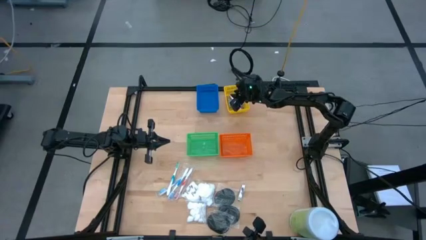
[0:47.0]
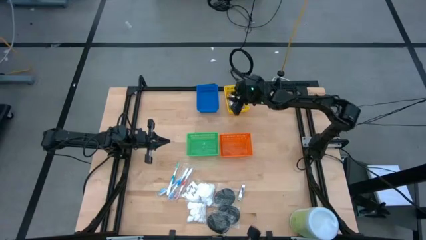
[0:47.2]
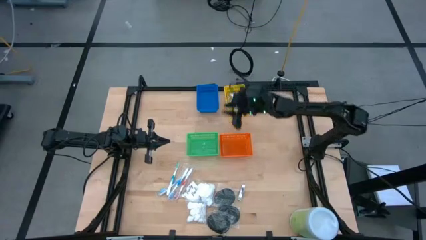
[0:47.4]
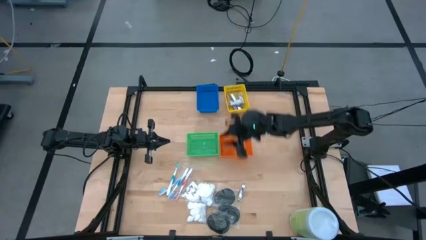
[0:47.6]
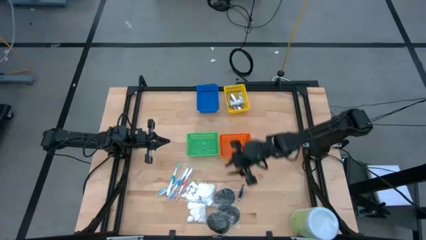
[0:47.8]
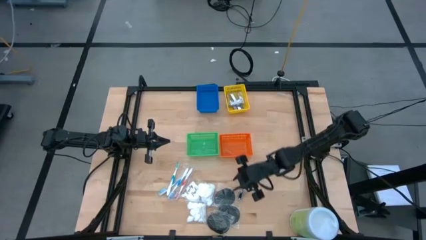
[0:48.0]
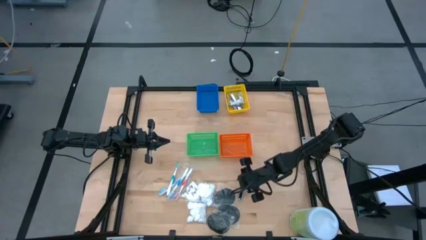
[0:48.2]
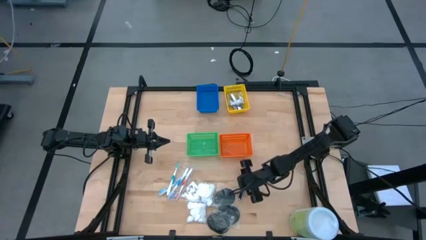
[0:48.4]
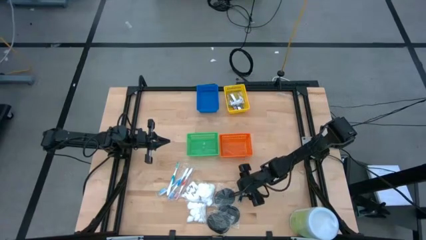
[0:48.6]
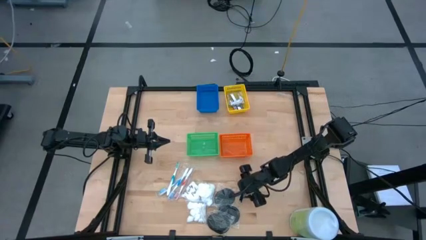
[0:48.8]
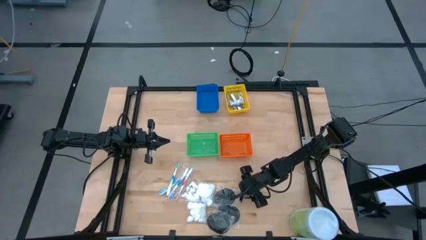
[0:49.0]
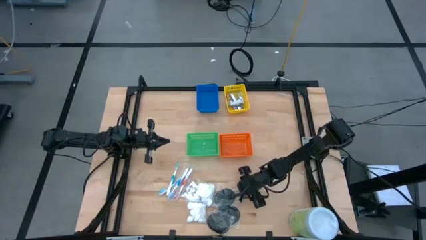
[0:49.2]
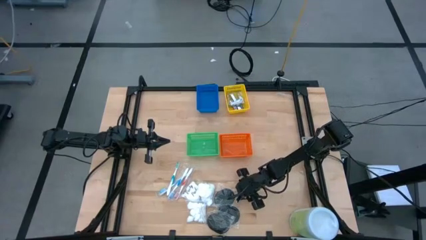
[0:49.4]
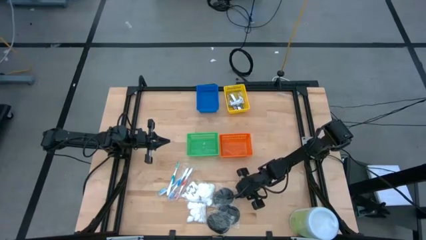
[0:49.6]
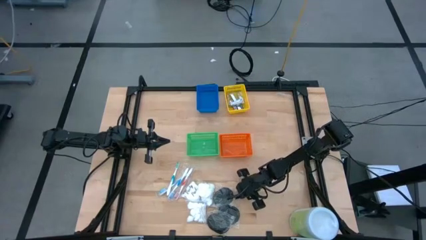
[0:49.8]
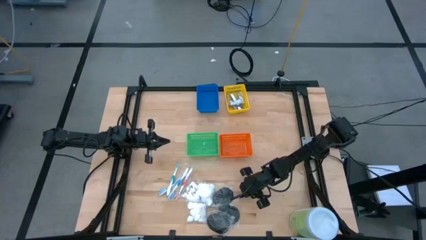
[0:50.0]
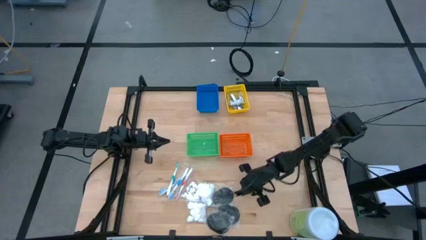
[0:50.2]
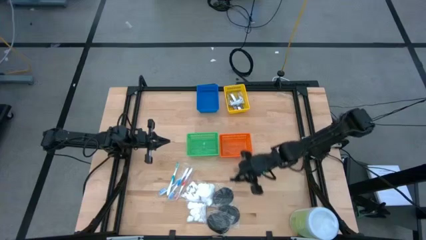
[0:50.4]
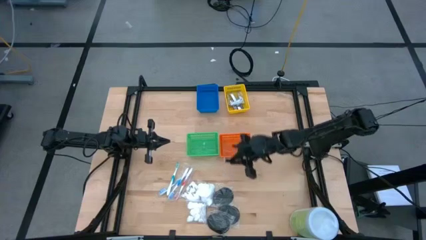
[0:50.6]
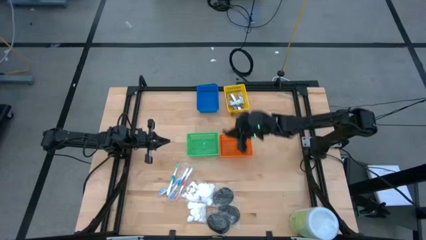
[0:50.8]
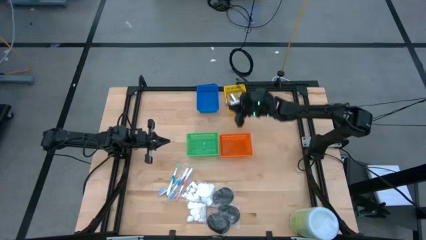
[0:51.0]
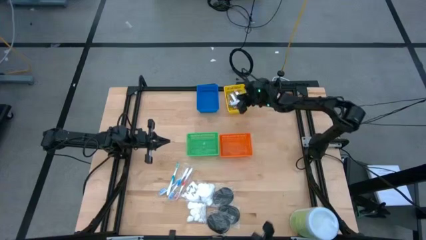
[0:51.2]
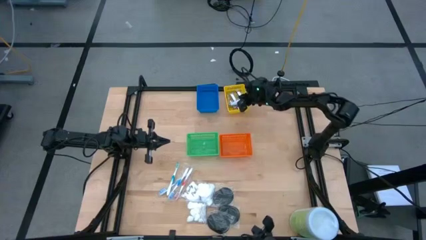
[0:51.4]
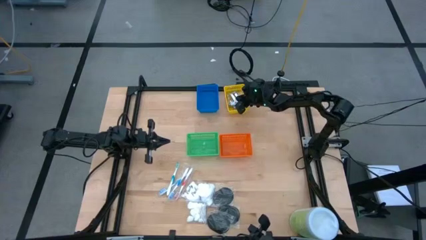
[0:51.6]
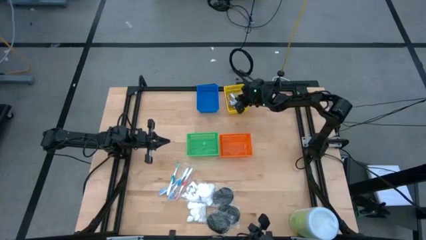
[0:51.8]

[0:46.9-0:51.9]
Task: Pick & Place Travel size toiletries
Put the nail cutter into the yellow bin

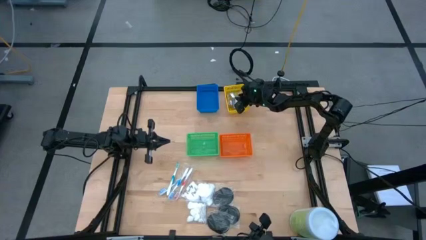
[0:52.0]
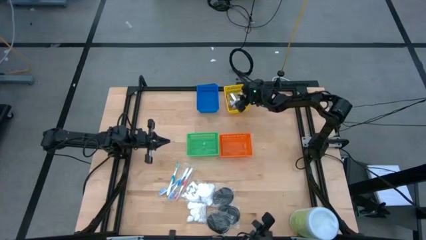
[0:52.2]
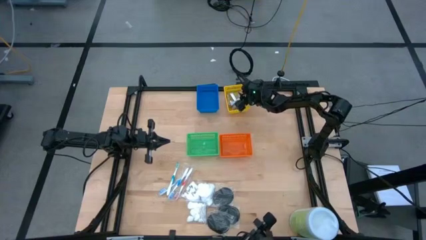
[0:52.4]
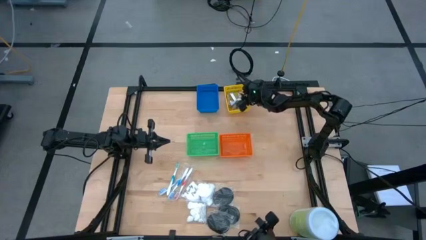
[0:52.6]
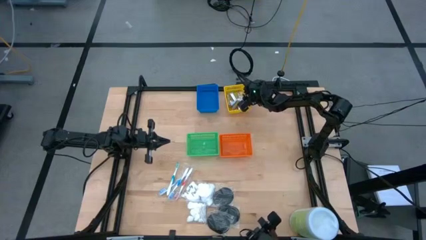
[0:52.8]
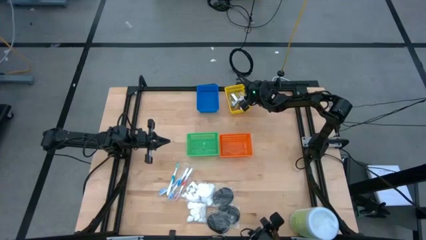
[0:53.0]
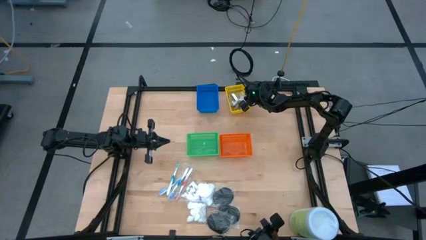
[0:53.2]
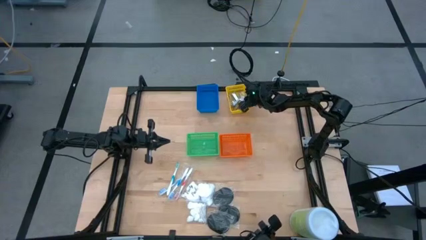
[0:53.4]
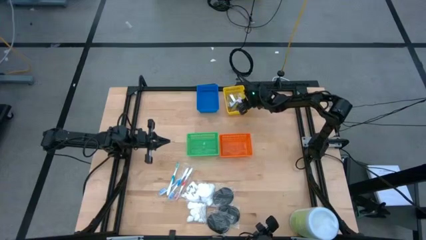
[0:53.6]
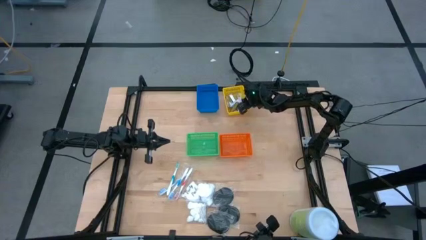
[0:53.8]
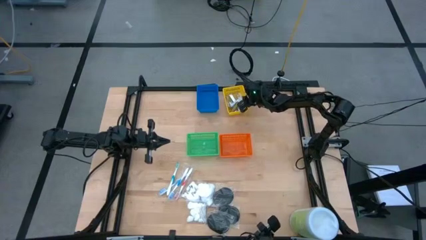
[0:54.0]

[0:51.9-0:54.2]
Adjust the yellow bin on the table

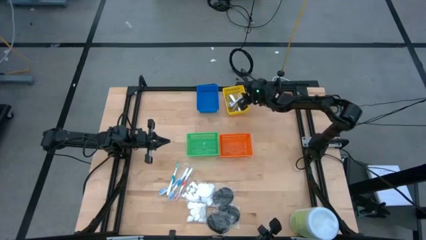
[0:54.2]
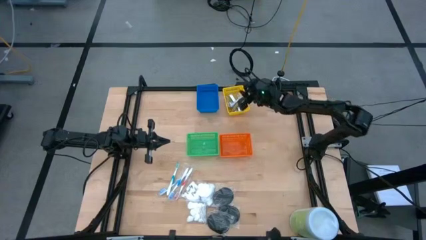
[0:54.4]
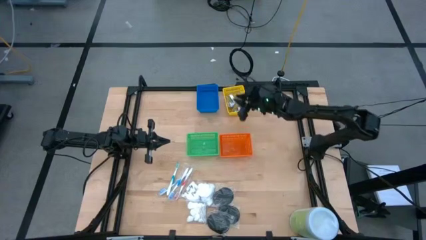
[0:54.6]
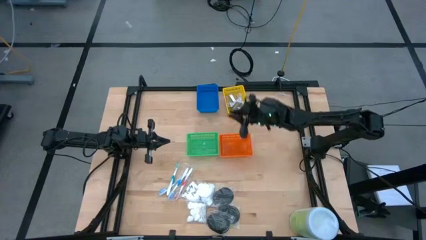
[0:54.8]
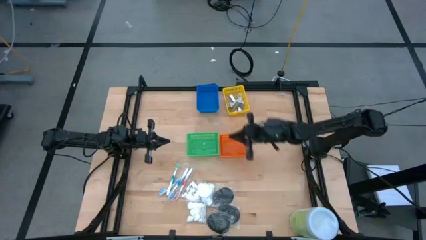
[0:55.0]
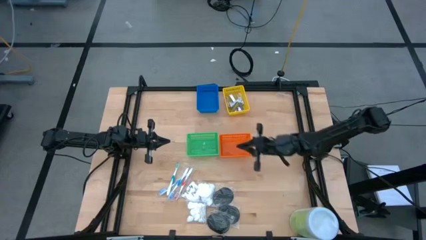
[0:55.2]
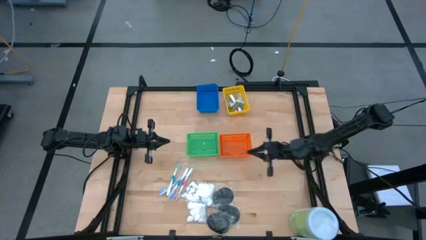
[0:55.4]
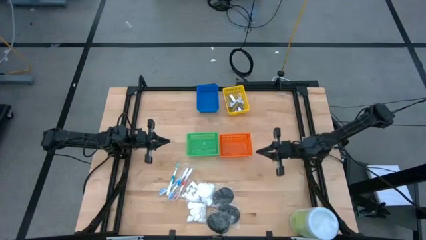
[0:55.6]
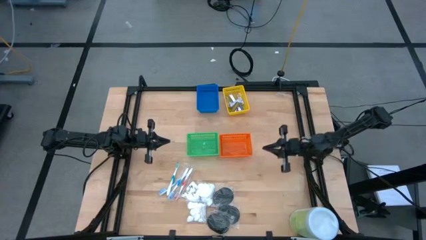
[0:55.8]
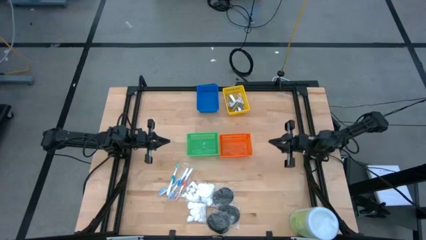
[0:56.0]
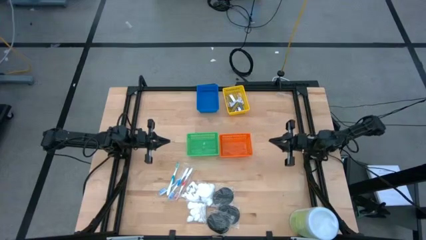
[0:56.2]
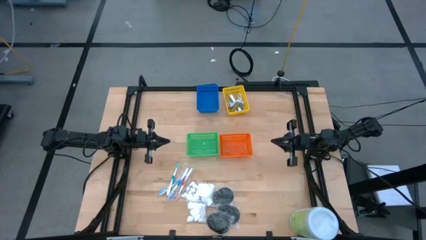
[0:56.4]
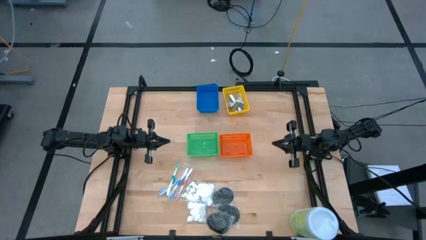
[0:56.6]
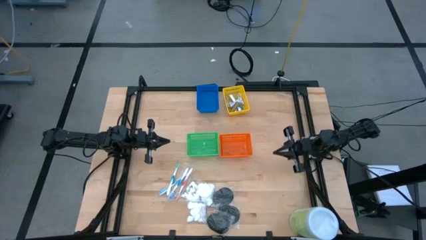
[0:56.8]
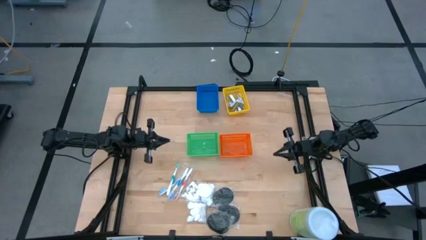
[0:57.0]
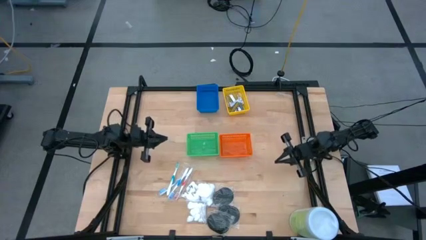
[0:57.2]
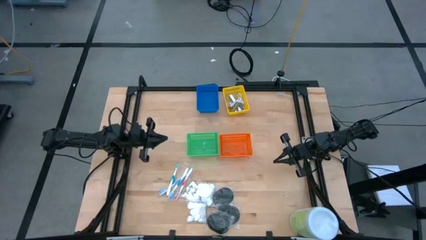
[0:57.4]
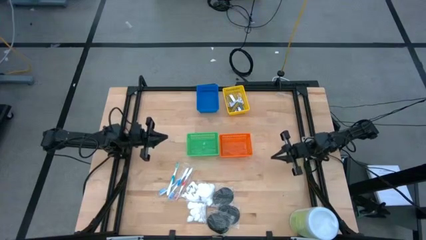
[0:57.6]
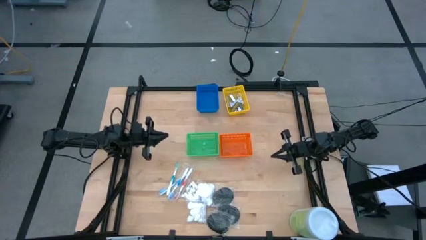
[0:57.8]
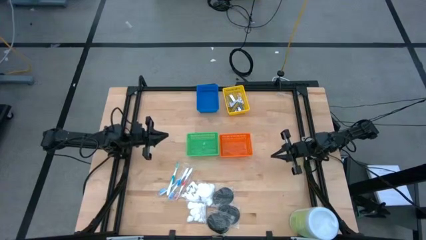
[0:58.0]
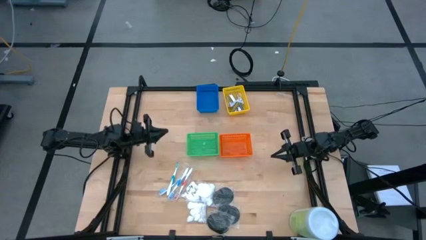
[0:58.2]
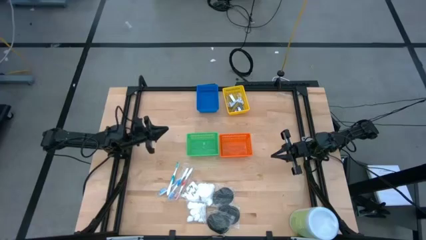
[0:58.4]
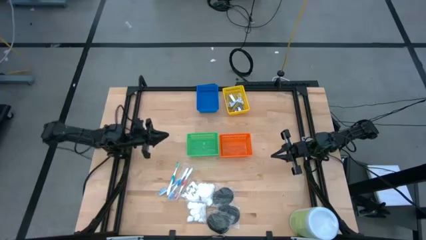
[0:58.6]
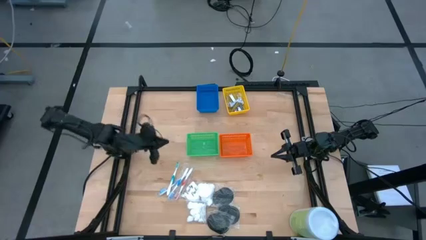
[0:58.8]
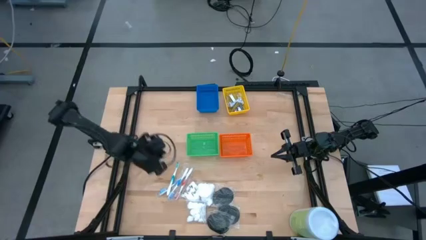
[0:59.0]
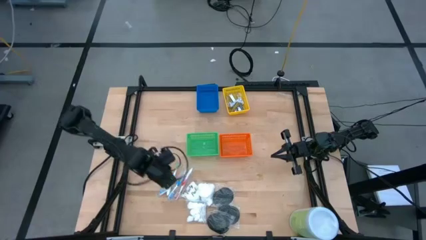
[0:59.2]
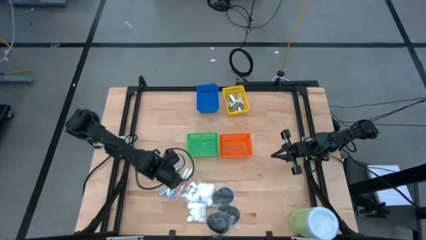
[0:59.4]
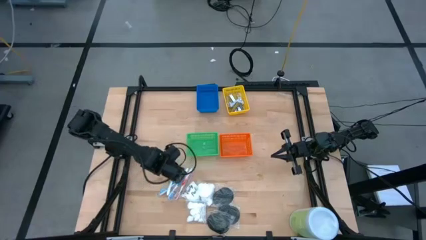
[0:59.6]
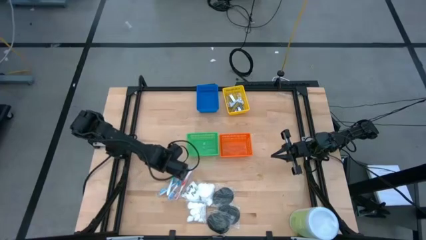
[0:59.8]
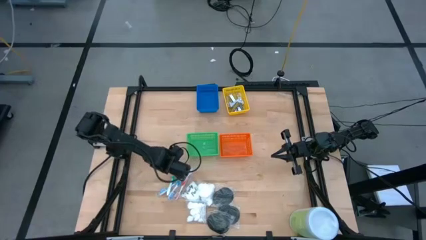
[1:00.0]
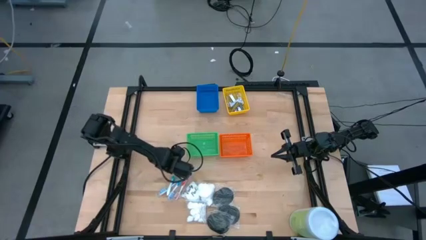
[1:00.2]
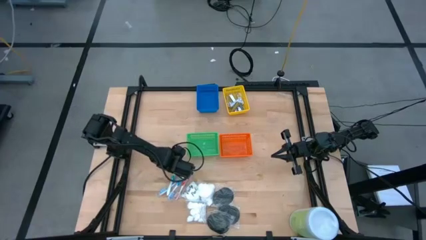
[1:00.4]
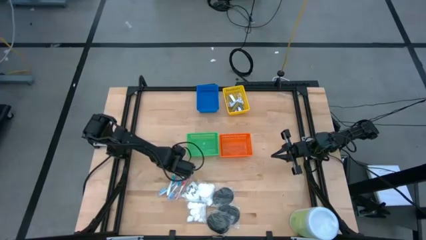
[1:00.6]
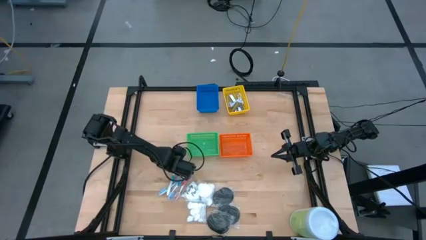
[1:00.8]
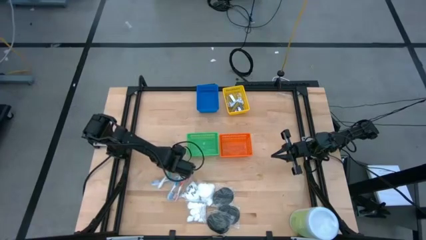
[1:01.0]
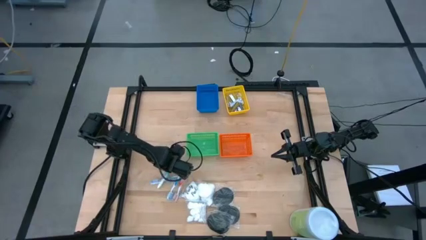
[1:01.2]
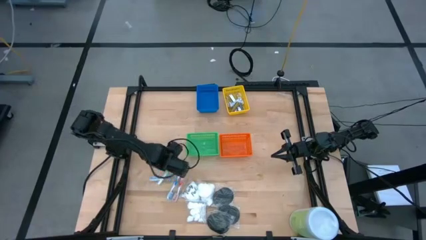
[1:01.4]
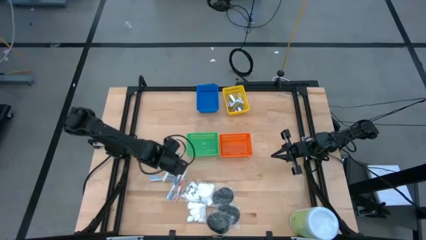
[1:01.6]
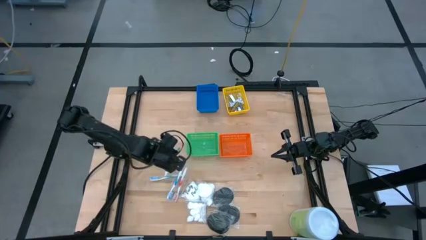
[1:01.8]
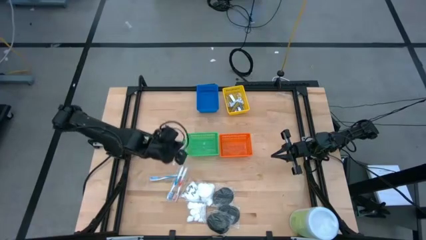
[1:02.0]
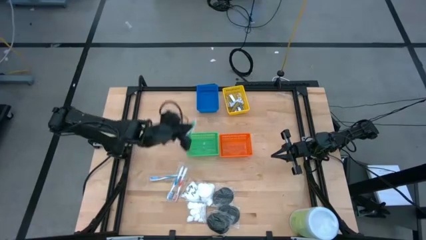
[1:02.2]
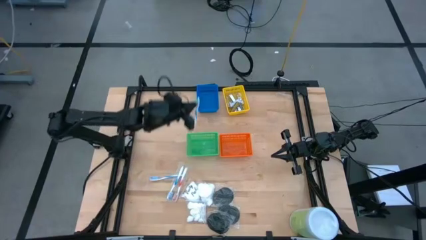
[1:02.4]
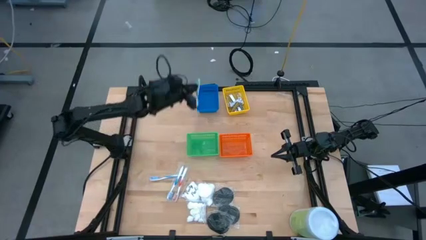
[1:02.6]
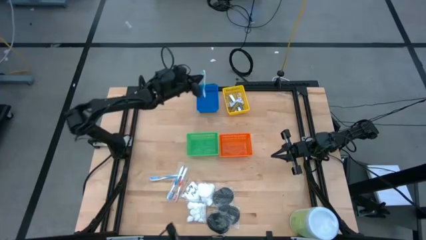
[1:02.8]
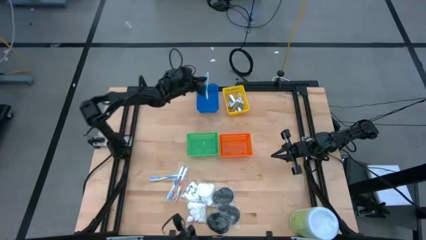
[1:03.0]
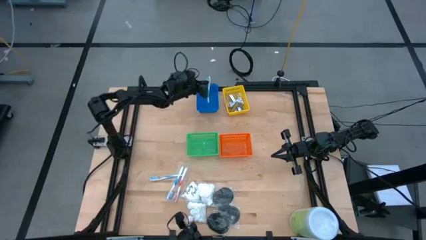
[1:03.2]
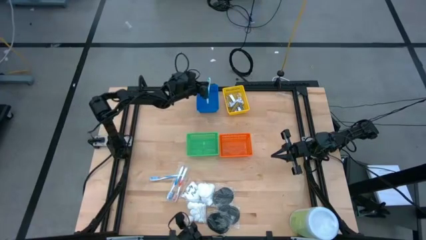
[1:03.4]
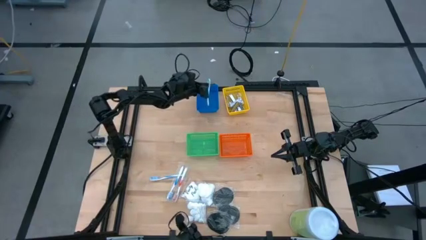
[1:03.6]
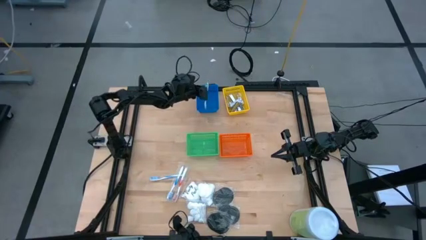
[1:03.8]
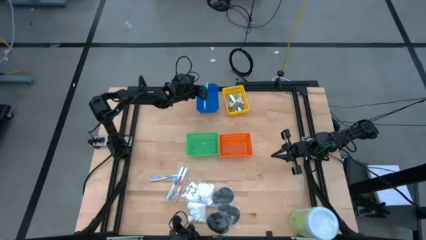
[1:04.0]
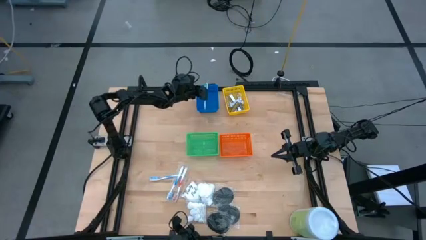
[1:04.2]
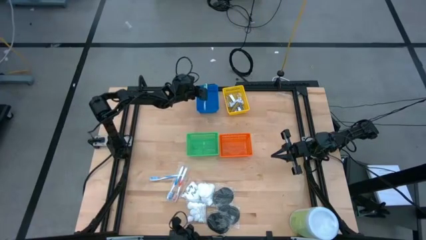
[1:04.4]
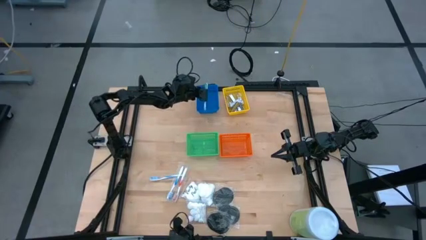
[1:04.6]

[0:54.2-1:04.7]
Put the green toothbrush into the blue bin
